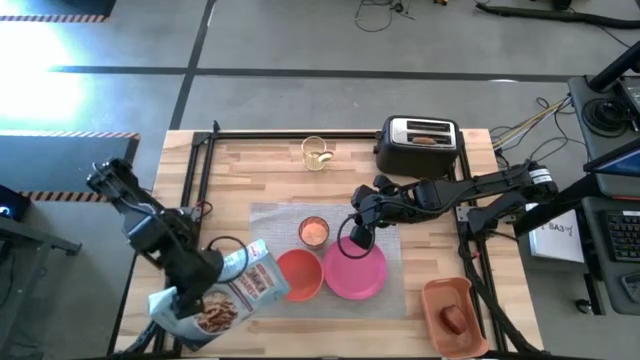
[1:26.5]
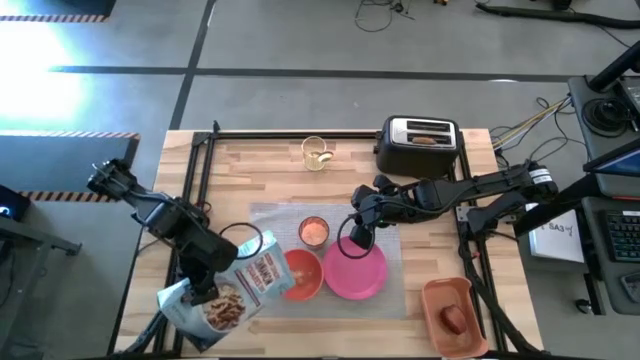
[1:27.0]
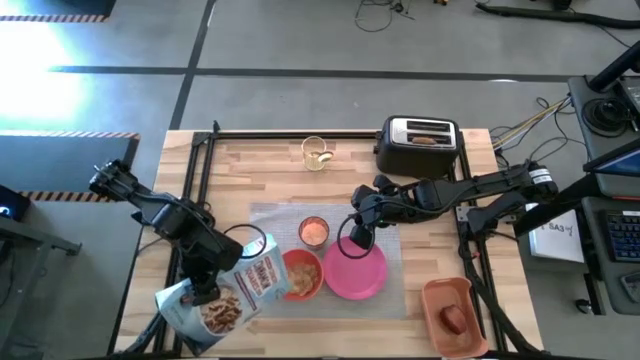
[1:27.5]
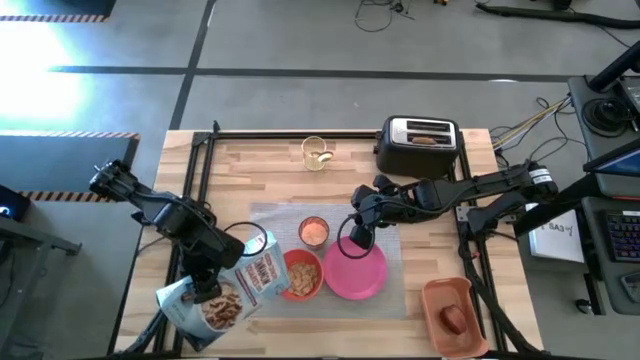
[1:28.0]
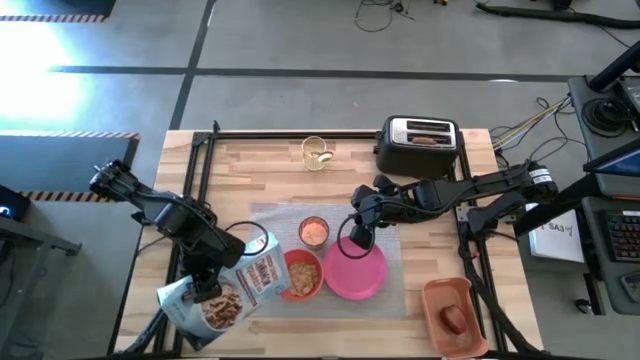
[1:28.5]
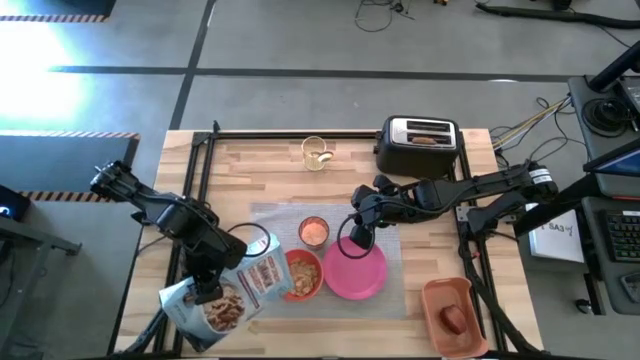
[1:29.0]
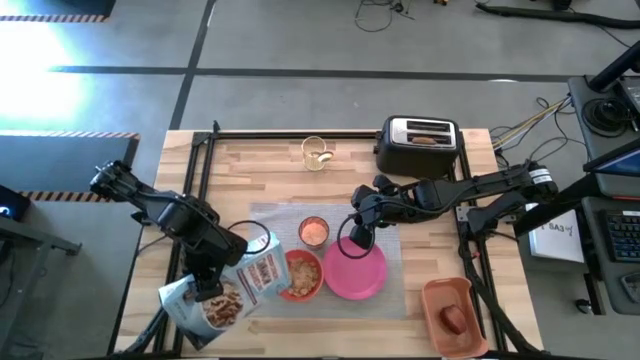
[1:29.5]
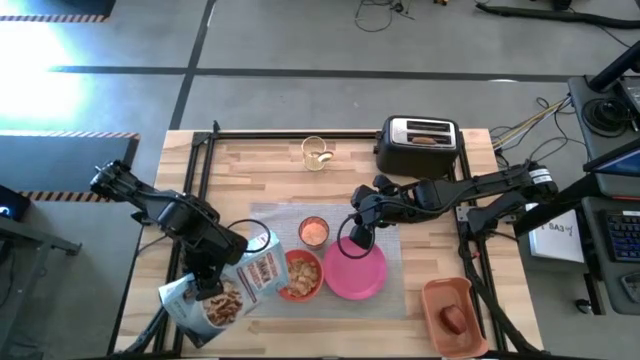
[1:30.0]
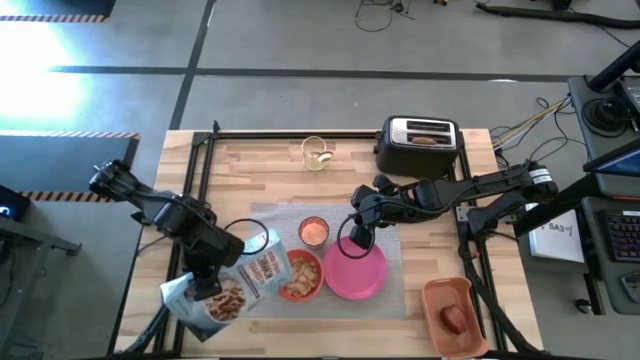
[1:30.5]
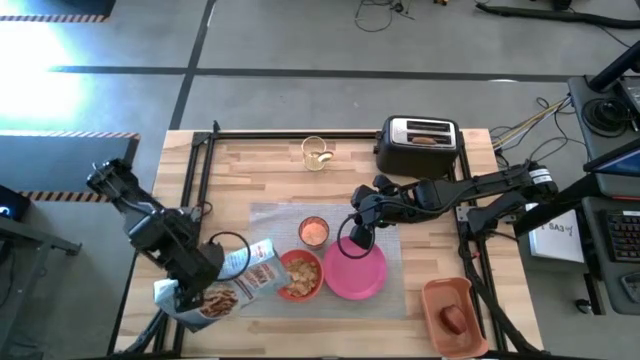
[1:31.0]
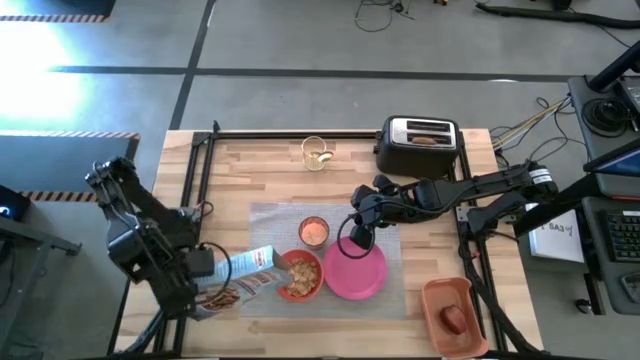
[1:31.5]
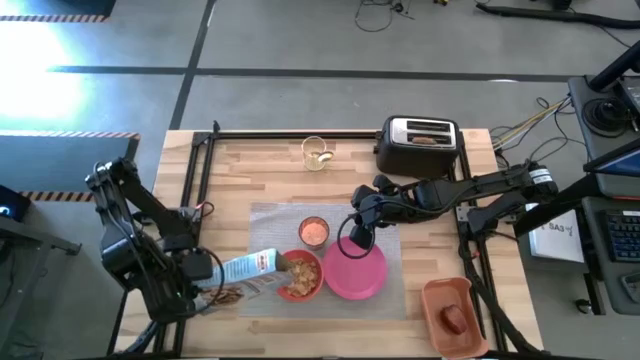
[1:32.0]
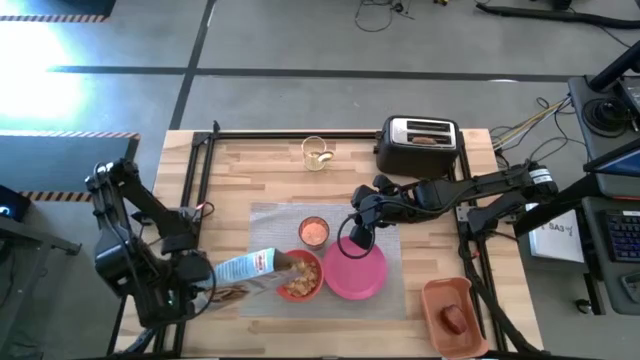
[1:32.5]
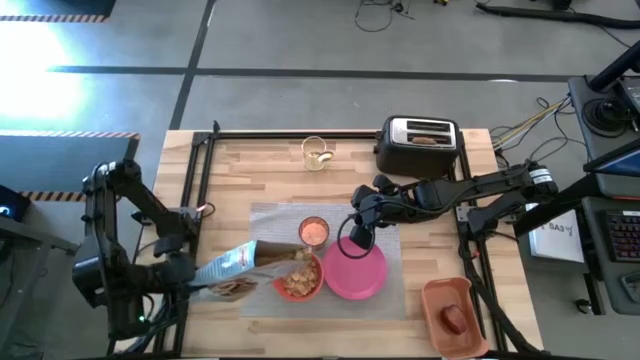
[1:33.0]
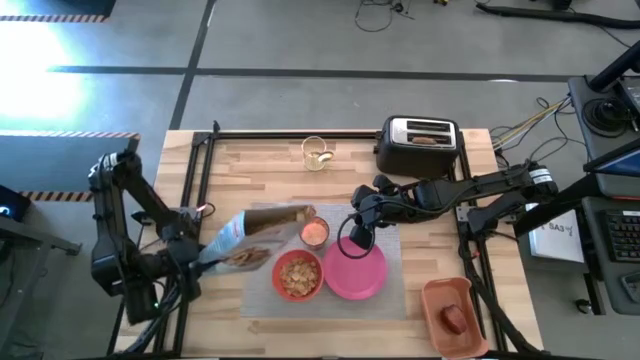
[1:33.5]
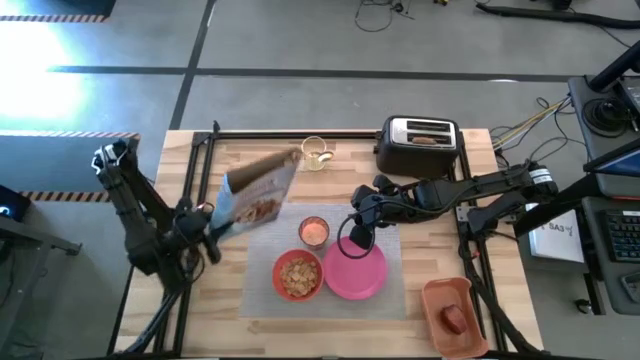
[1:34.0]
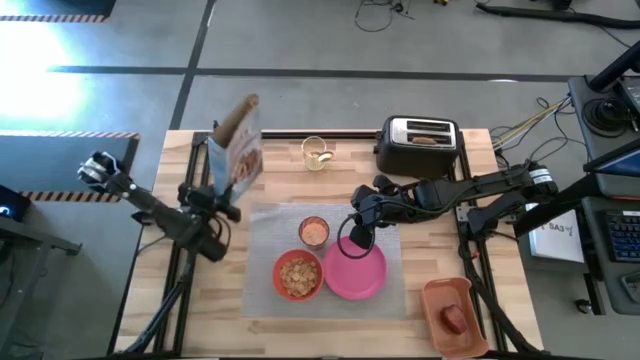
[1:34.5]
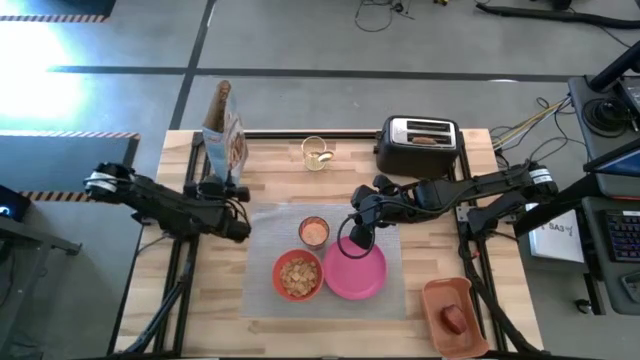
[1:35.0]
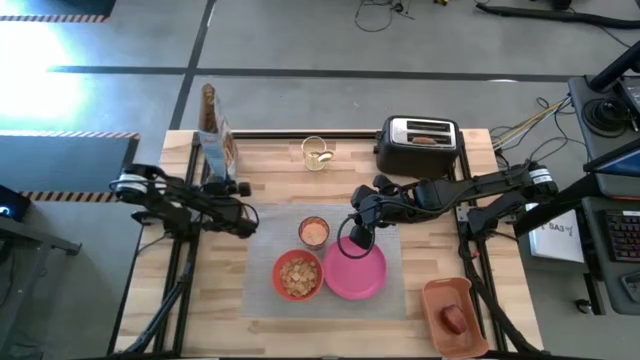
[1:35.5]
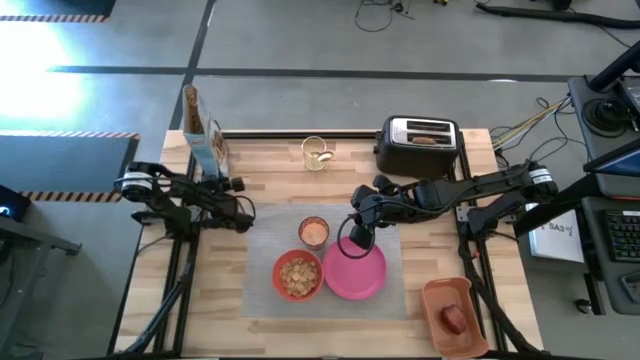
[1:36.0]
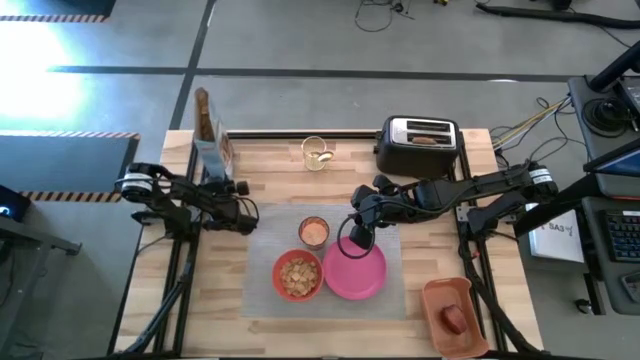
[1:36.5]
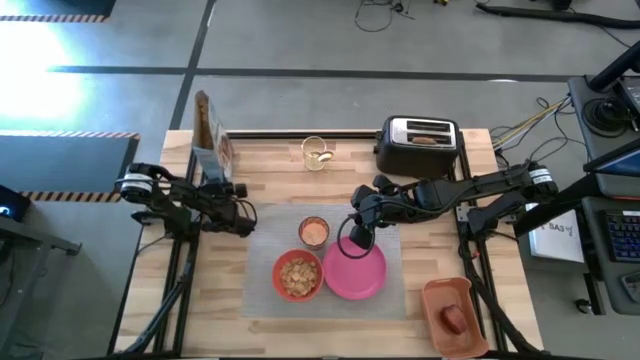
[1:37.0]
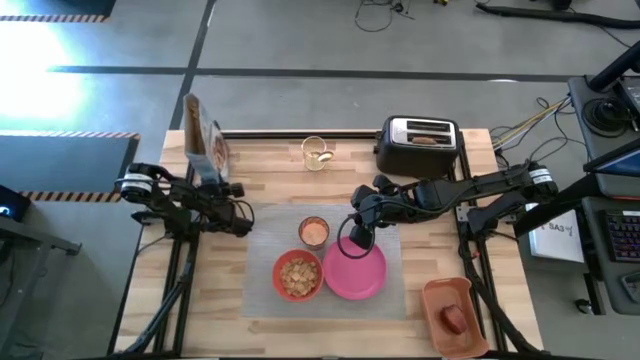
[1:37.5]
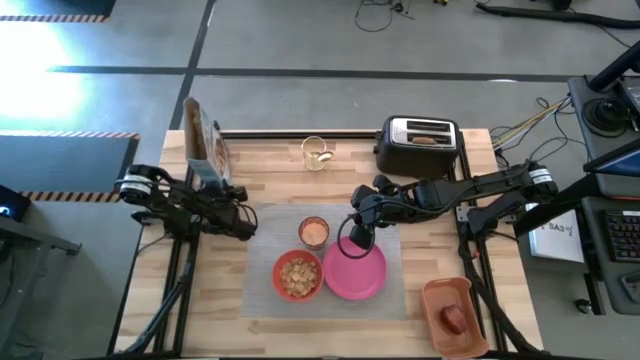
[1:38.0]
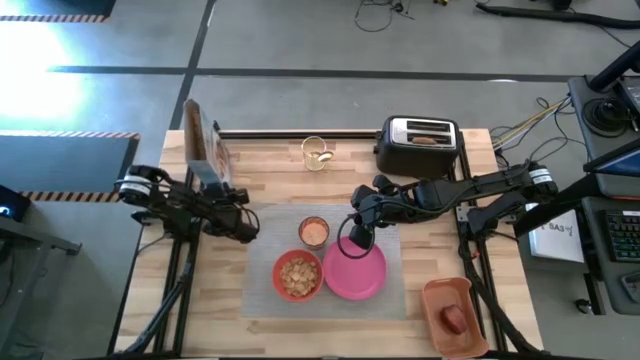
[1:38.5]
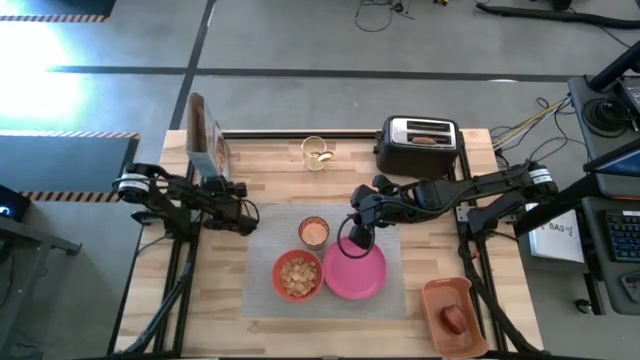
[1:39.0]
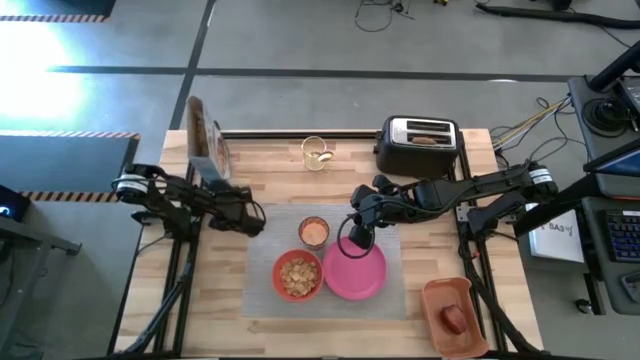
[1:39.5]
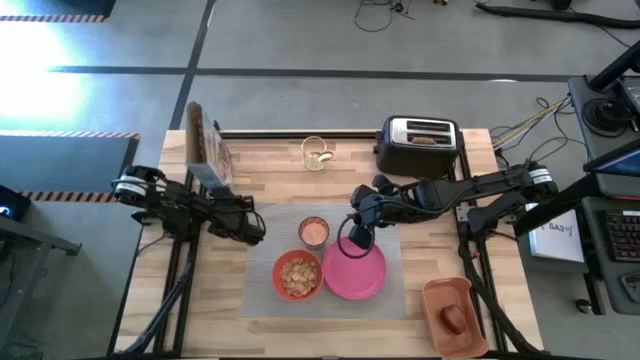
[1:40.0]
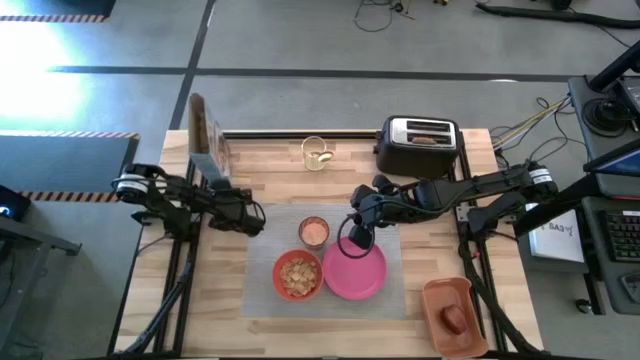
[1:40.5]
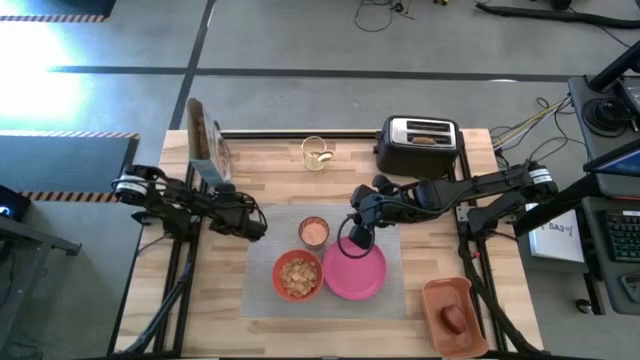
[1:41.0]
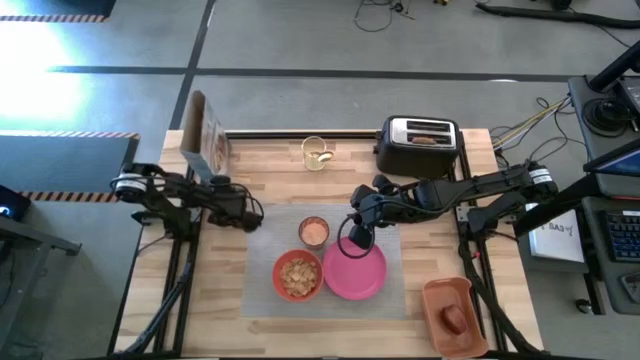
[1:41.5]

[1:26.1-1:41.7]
Task: Arrange a breakfast setting
Pour the cereal from the blue cereal box into the orange bowl

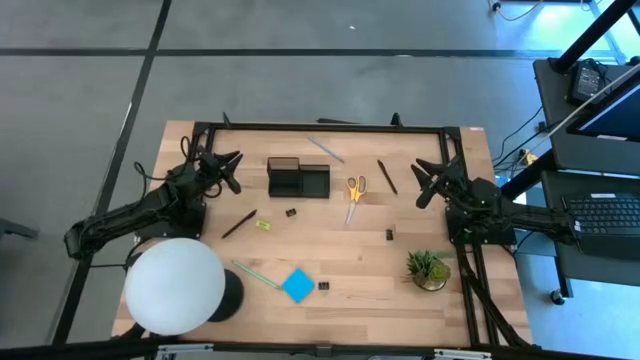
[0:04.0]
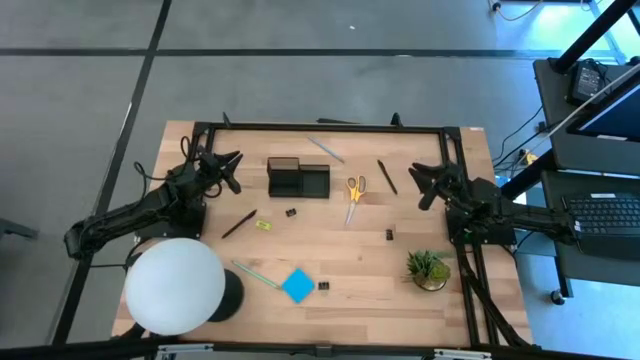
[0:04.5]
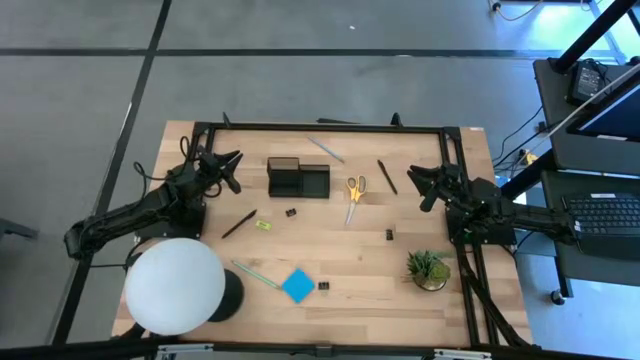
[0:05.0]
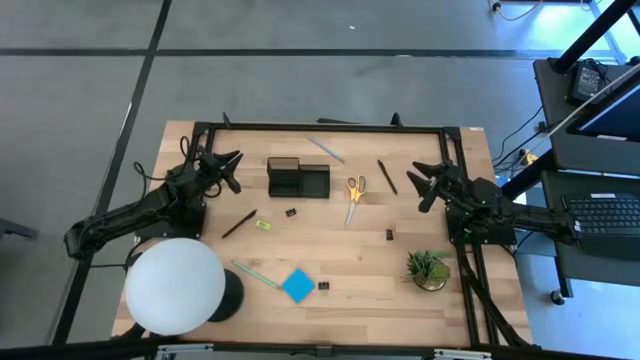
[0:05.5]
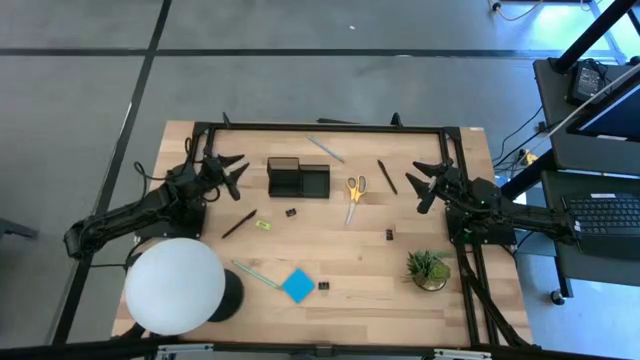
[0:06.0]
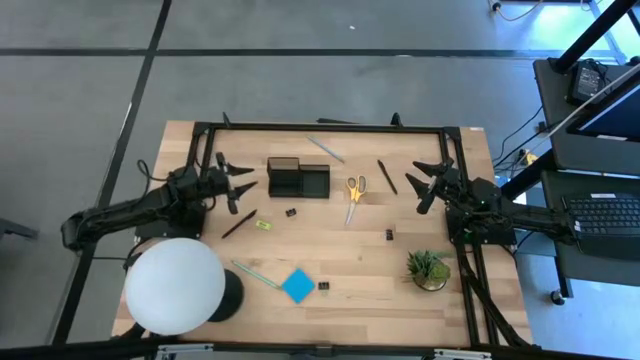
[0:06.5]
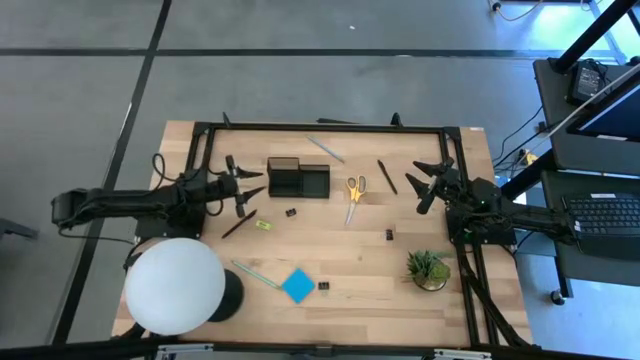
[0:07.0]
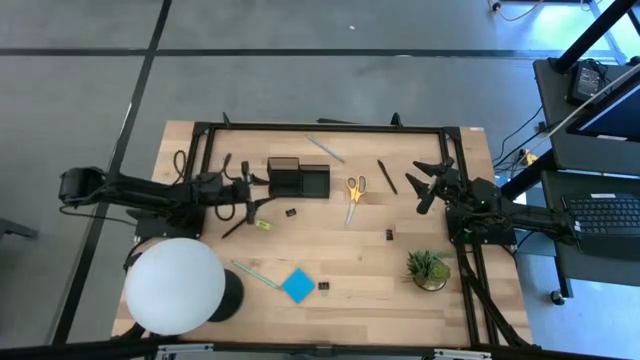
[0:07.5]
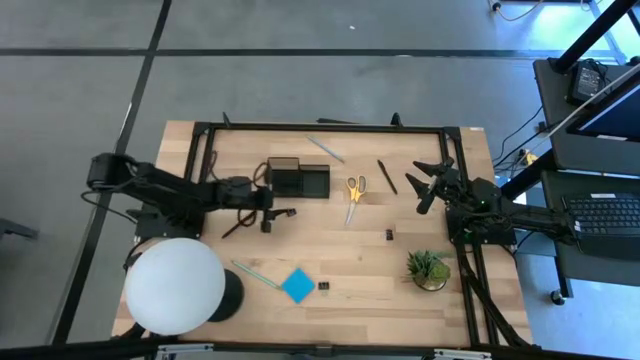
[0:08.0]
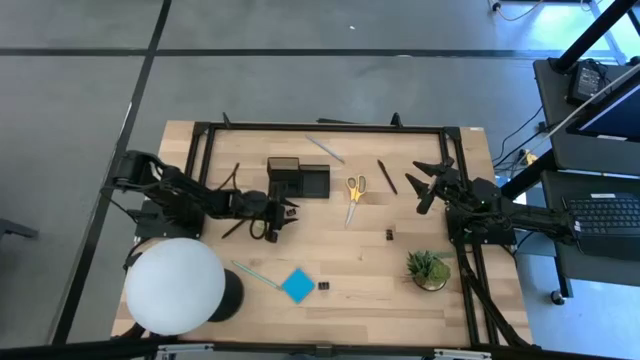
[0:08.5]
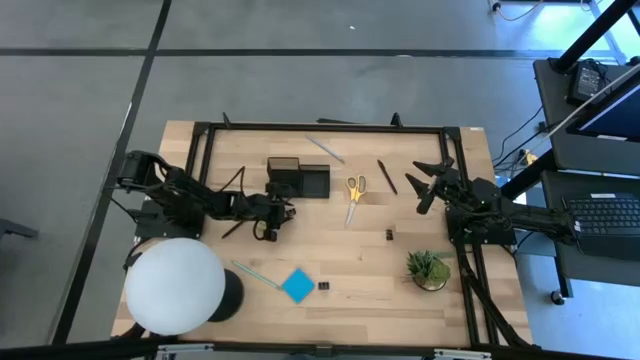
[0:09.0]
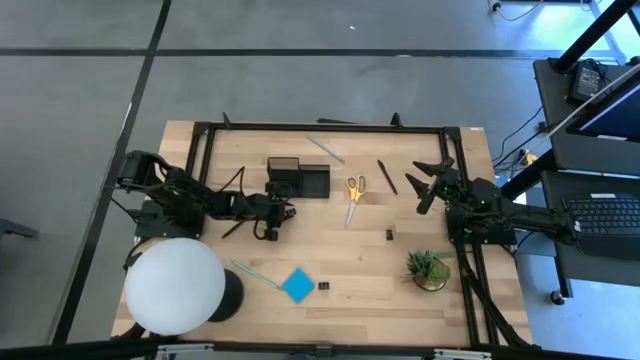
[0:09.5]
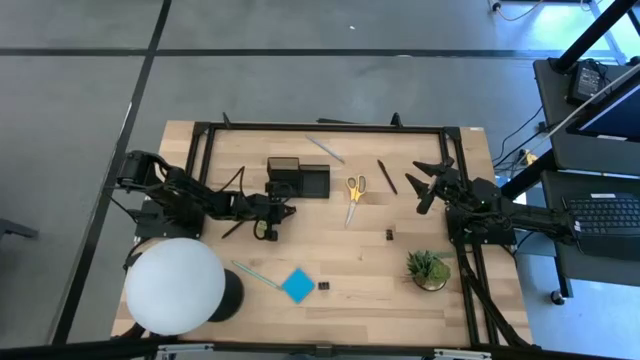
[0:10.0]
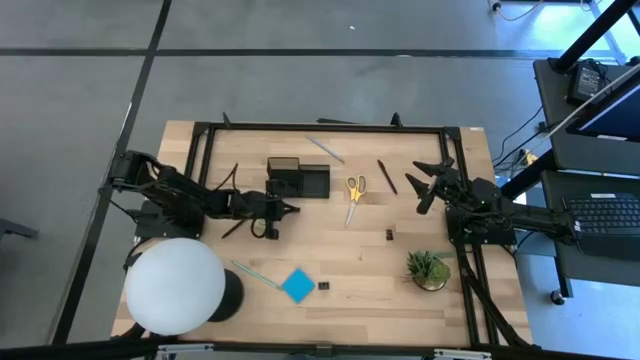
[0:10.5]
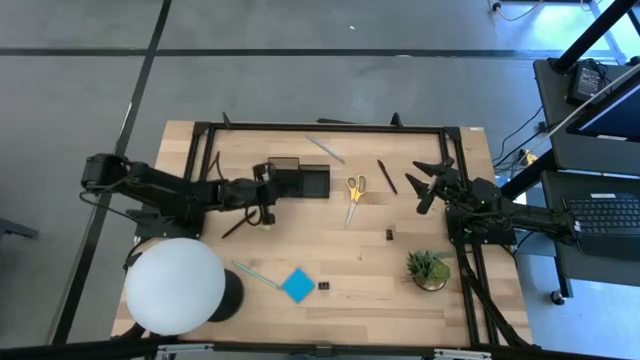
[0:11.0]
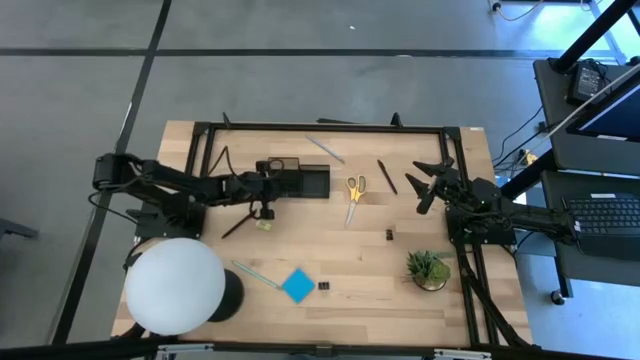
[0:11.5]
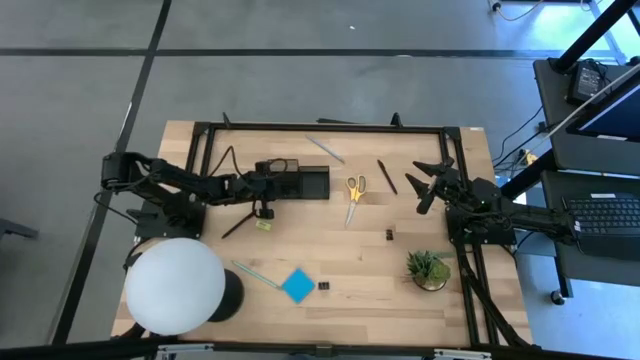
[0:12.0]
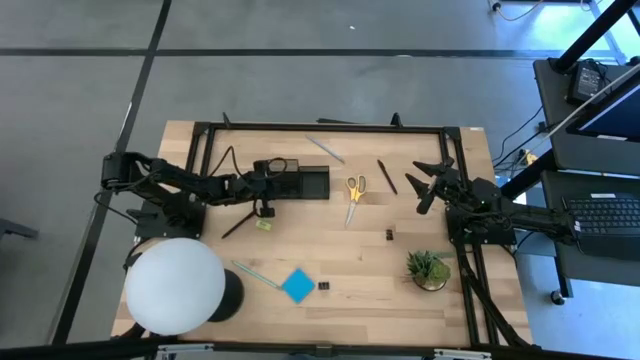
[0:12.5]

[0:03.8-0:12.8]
Task: Pick and place office supplies into organizer
Put the left black binder clip into the black desk organizer
